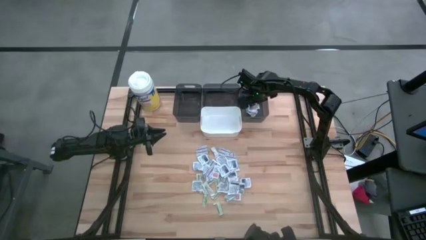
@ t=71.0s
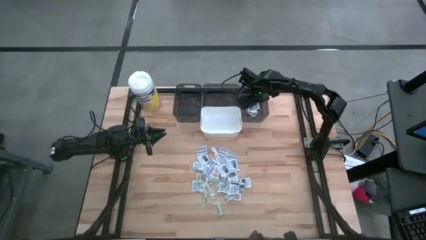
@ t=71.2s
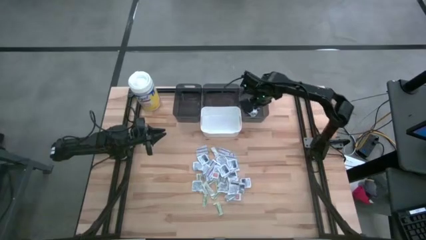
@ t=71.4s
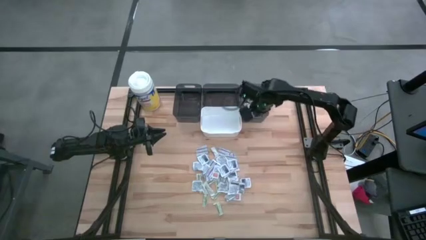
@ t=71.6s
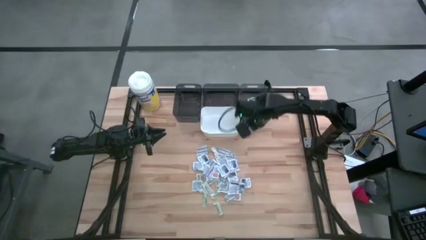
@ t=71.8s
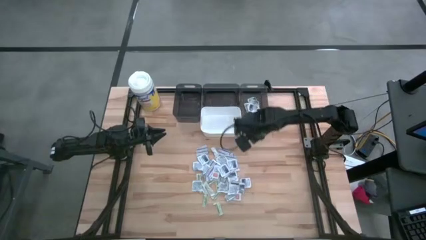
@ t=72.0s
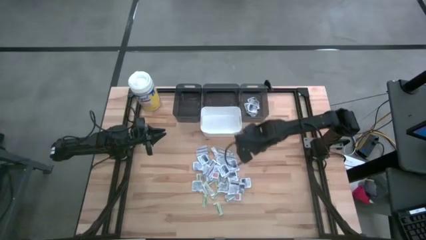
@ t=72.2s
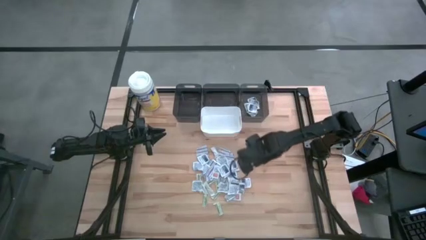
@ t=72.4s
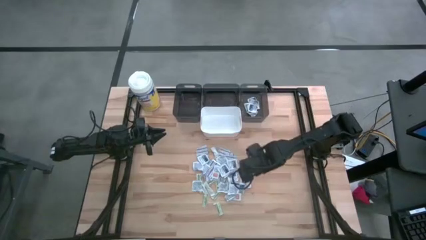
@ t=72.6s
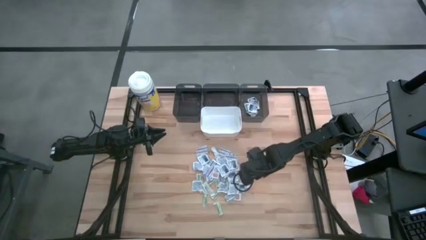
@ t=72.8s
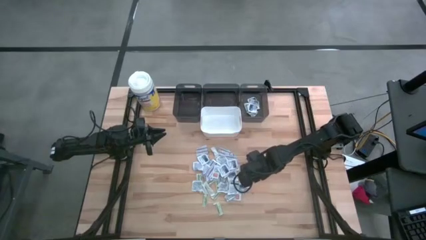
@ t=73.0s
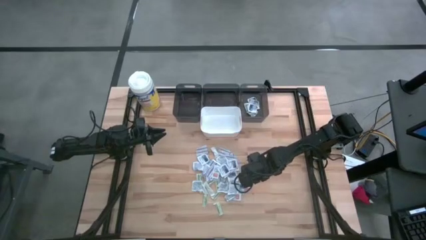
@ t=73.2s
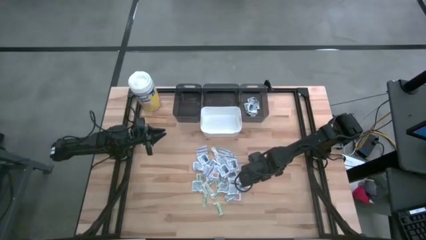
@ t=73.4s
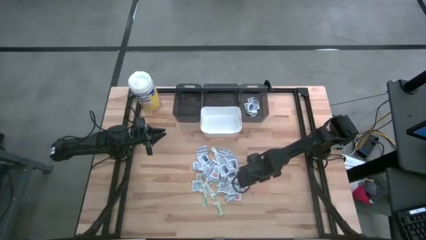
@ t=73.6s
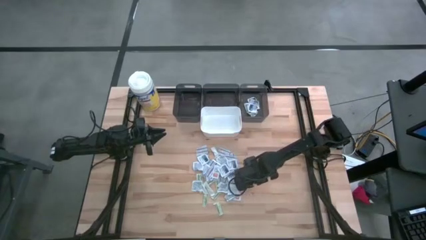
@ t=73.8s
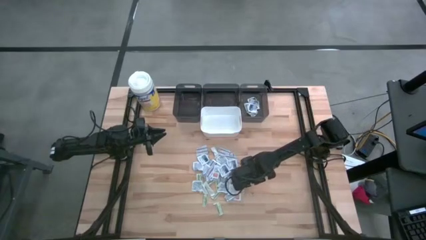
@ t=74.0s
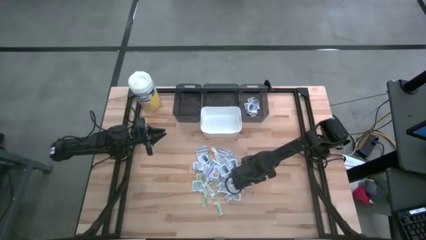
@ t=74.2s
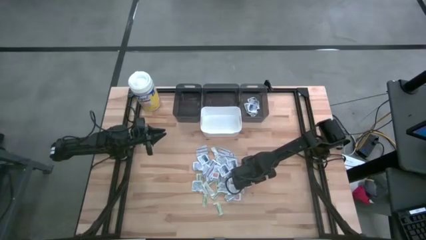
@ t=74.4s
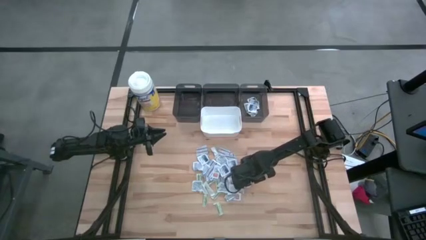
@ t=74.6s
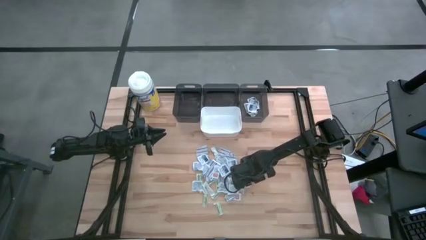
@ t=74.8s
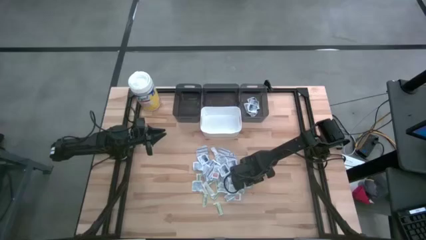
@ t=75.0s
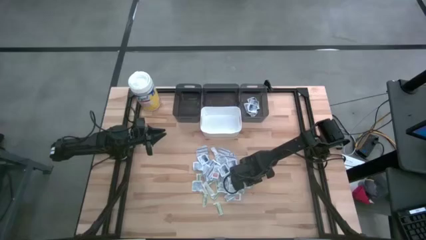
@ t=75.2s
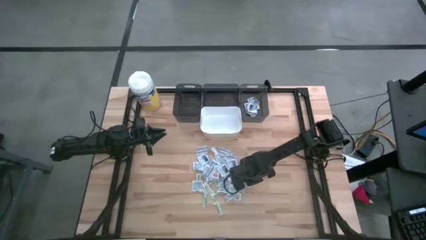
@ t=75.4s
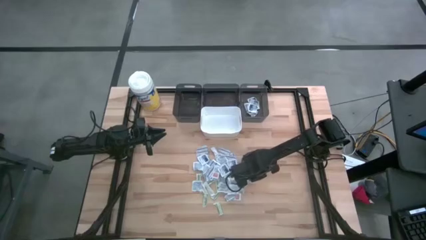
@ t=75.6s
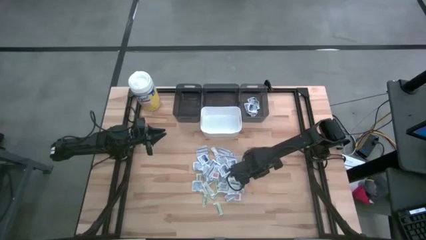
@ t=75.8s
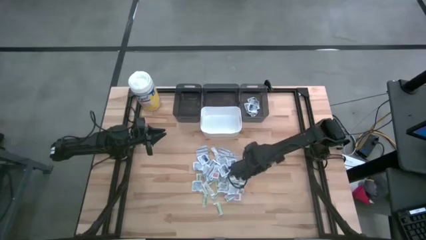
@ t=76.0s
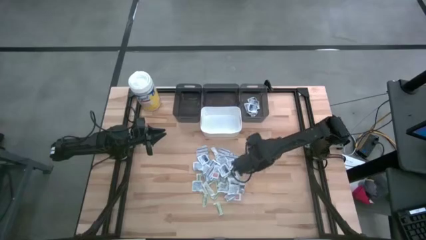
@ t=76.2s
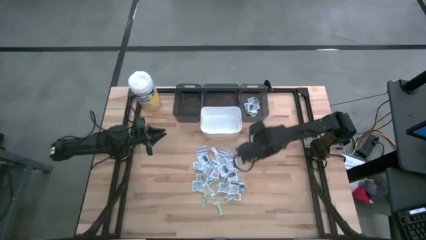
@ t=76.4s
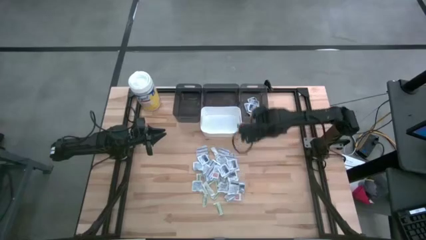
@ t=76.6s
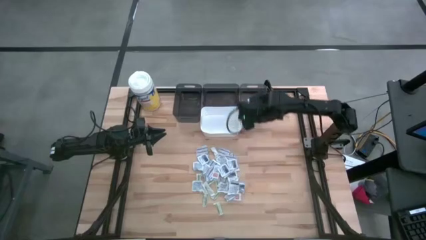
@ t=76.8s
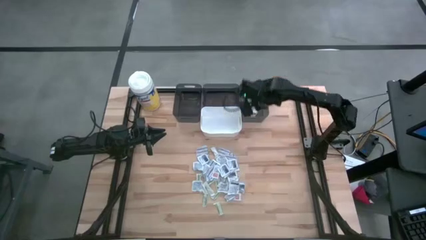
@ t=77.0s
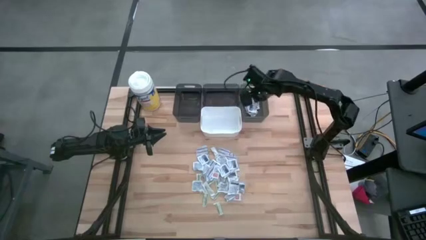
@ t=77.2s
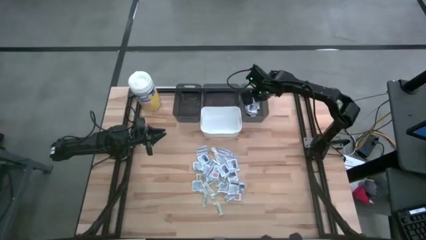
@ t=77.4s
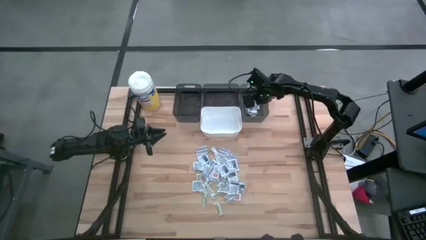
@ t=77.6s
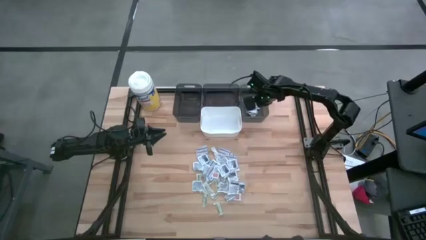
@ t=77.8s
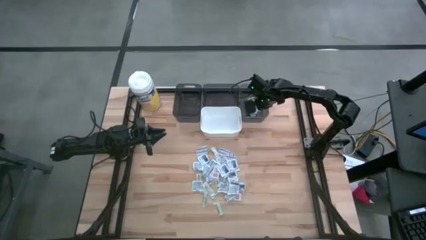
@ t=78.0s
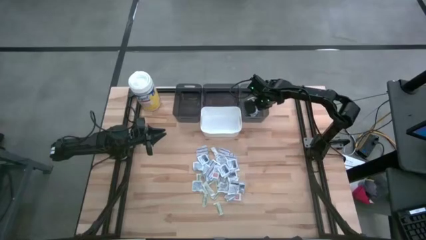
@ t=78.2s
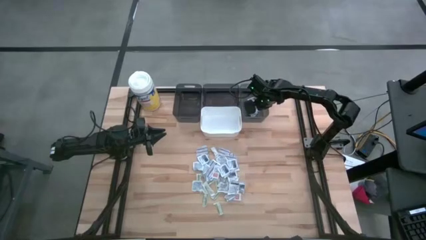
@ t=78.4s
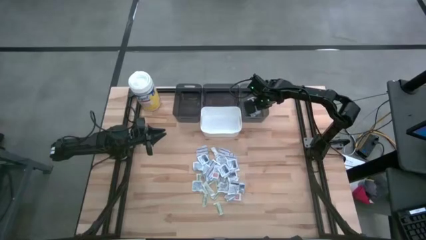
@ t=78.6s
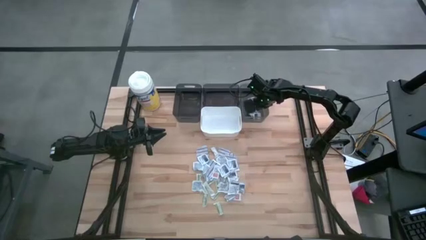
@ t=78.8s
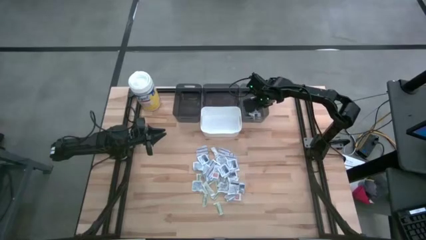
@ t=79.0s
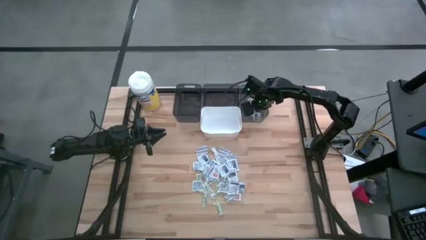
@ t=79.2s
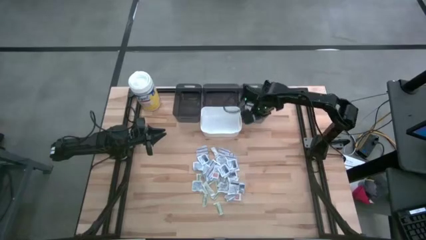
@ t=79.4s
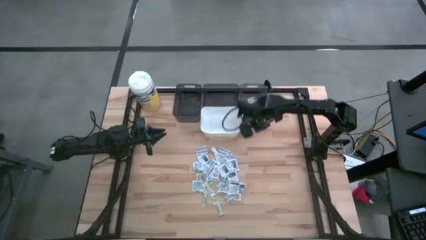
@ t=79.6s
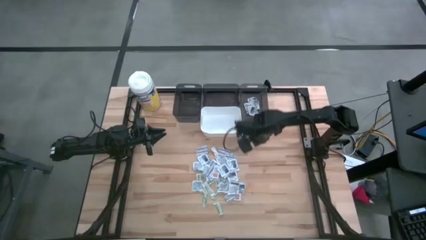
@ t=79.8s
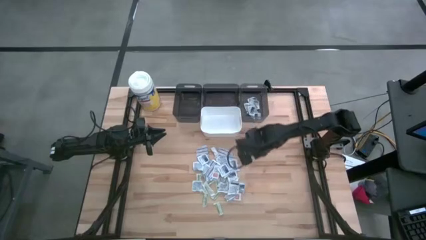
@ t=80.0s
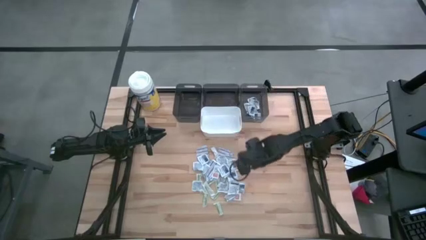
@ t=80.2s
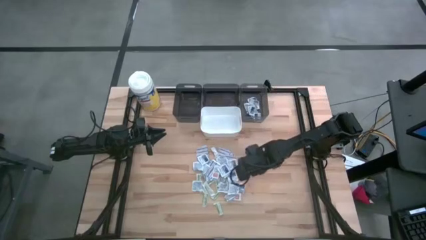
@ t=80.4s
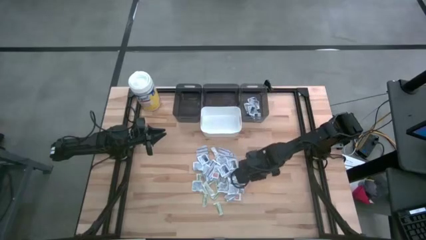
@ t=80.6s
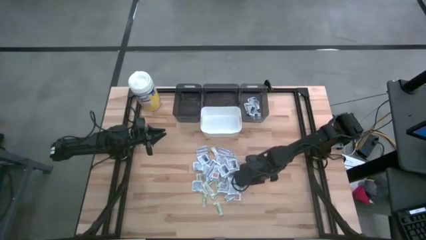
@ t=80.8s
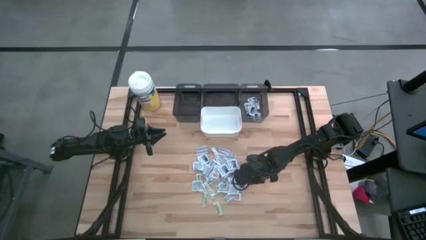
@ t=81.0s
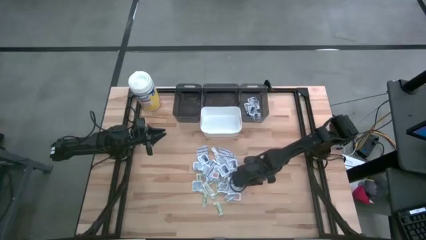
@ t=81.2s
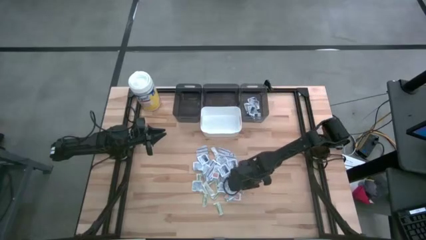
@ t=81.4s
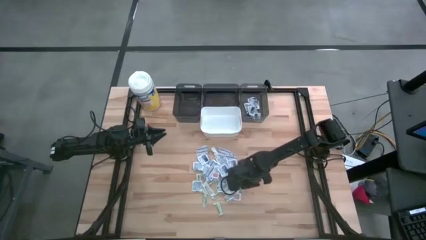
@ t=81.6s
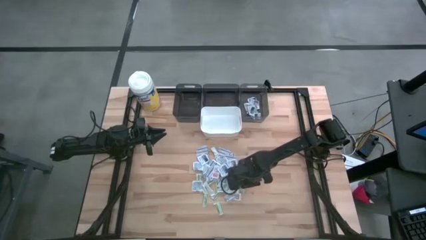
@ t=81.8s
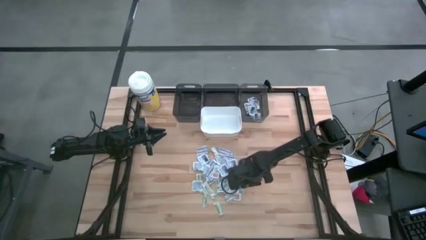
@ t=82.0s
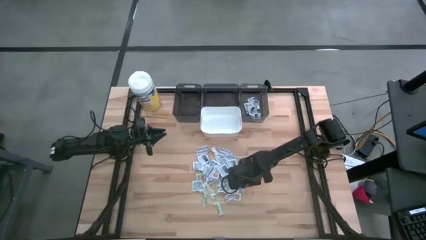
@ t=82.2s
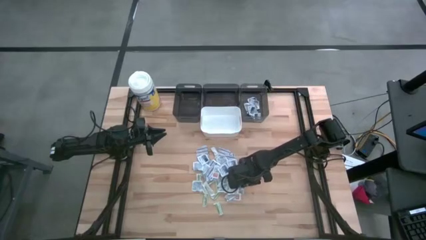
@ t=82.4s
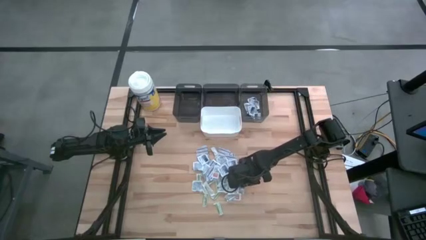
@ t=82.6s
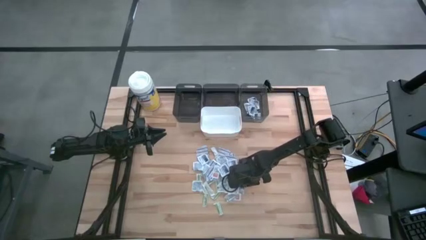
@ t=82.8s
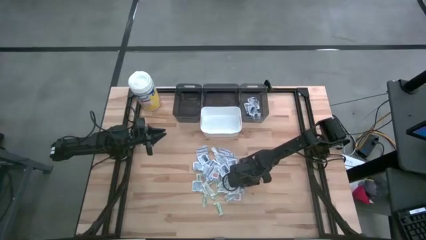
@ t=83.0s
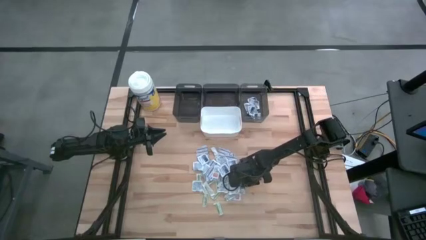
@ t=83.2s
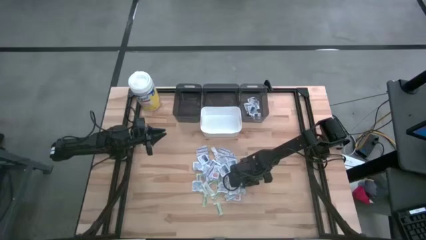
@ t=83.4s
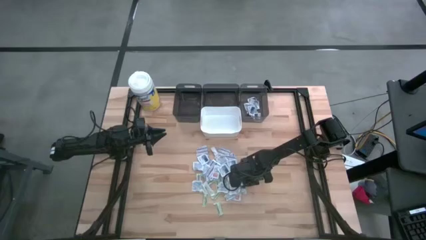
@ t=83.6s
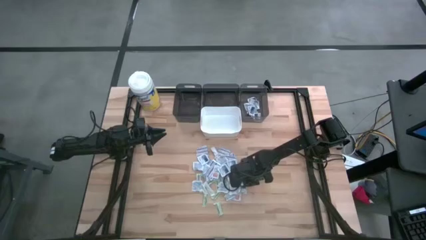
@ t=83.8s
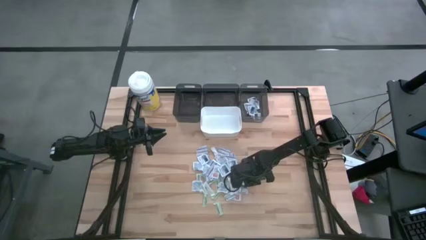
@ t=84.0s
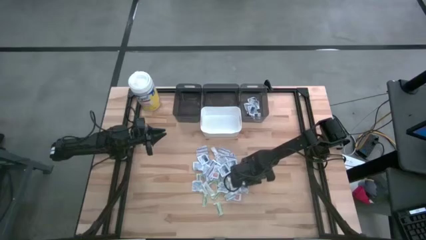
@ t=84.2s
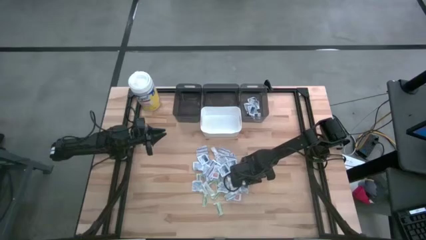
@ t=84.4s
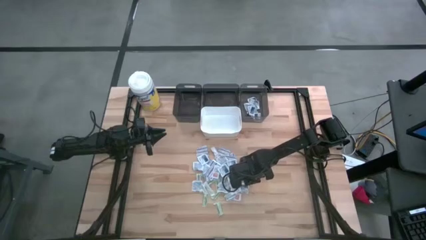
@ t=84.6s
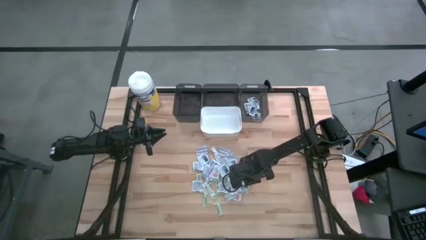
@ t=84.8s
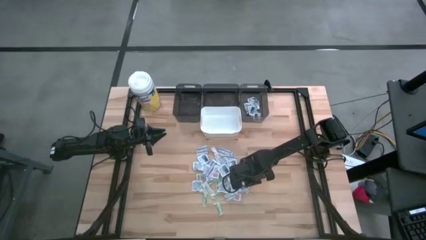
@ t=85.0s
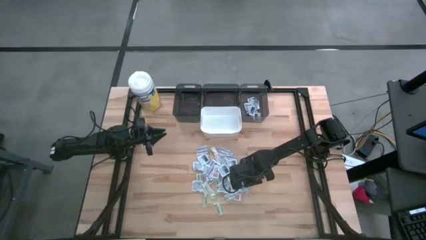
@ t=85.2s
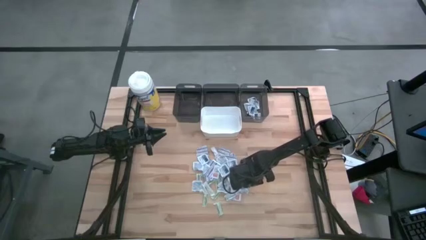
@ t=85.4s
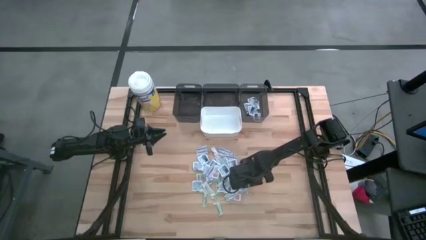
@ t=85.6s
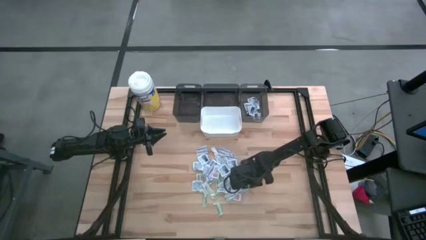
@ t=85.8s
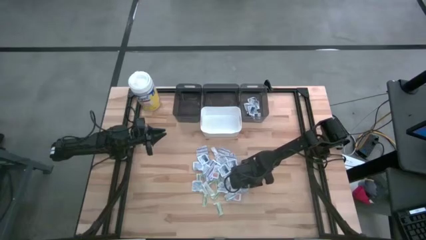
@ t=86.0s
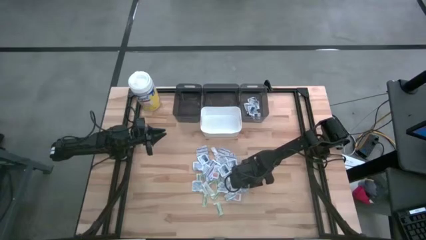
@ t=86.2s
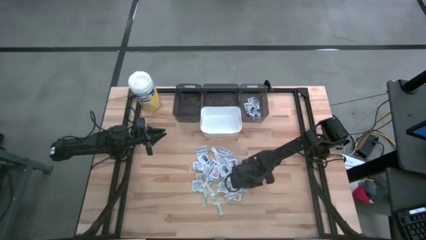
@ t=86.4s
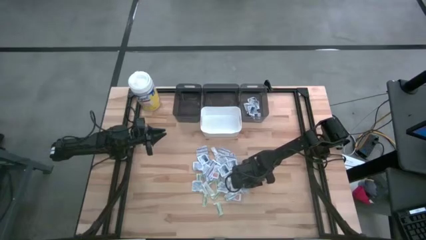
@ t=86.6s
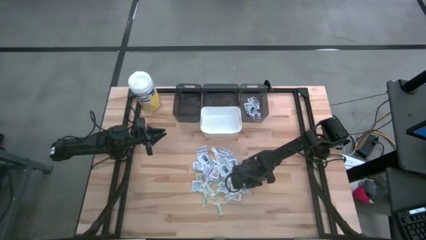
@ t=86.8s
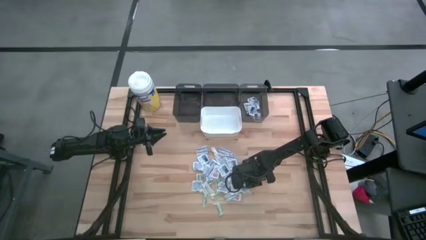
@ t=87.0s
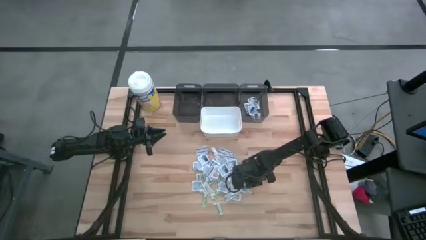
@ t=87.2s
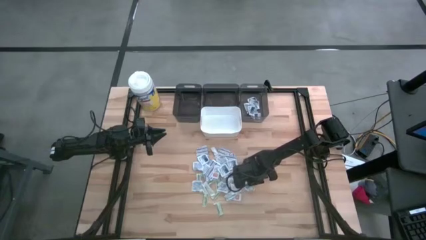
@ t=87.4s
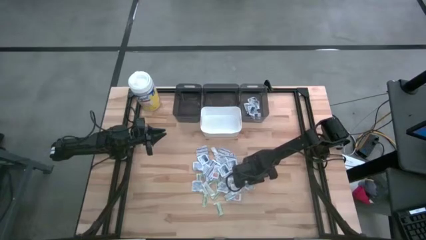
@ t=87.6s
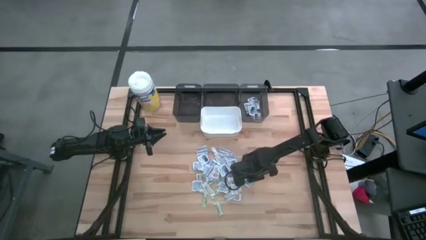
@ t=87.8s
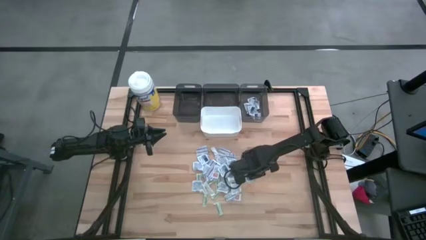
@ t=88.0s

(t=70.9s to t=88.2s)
Task: Pick & Place First Aid Supplies
Put the blue alcohol pad into the right black bin
